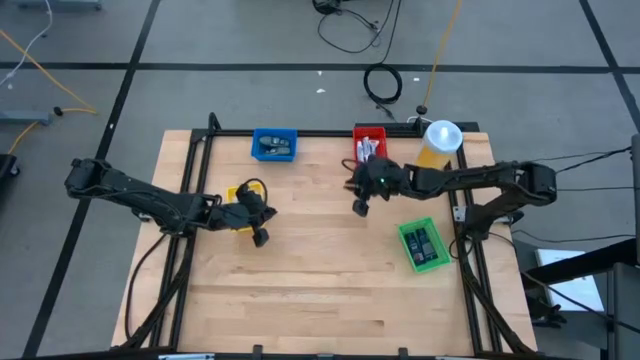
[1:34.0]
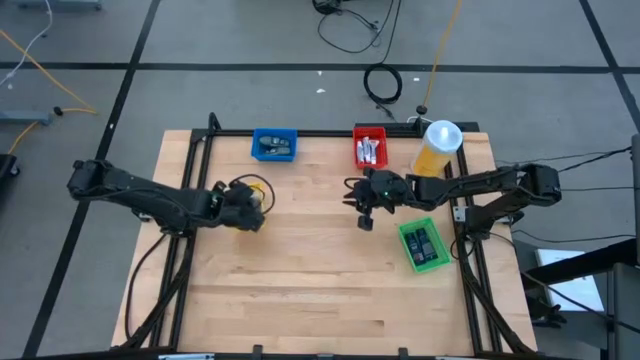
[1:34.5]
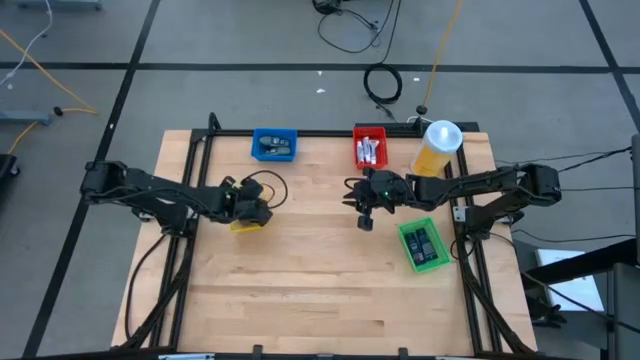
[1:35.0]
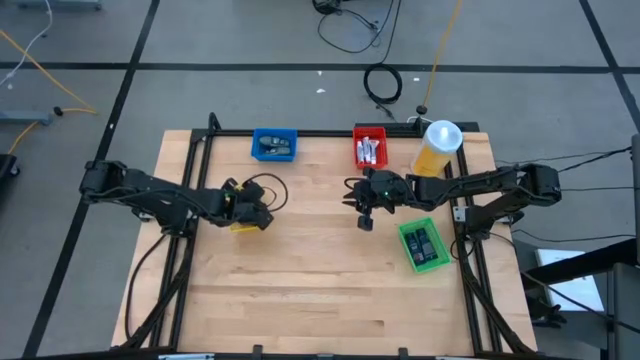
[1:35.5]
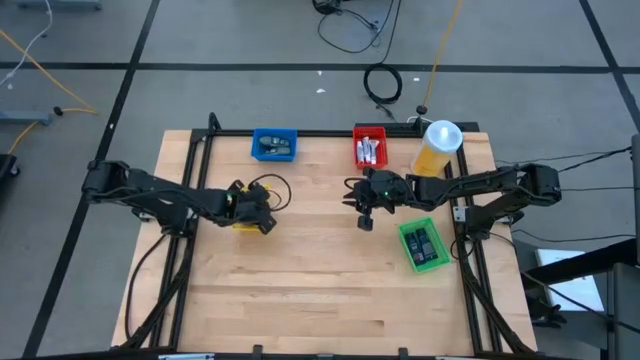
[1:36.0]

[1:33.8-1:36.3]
Task: Pick & Place Travel size toiletries
Adjust the yellow bin on the table

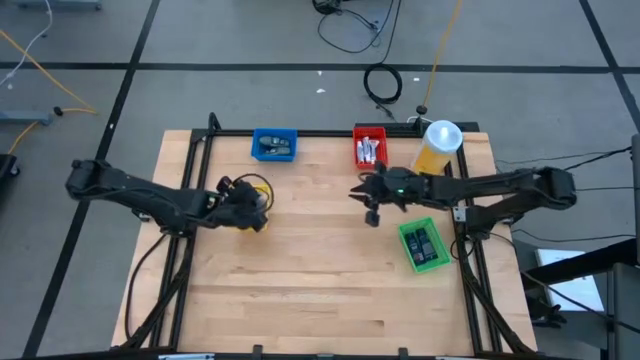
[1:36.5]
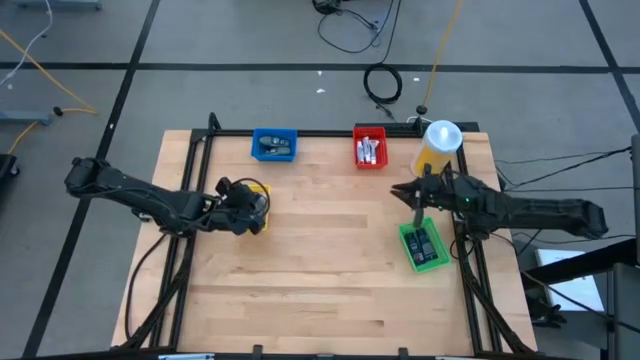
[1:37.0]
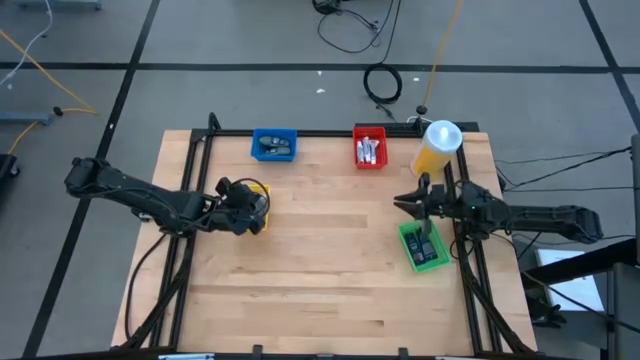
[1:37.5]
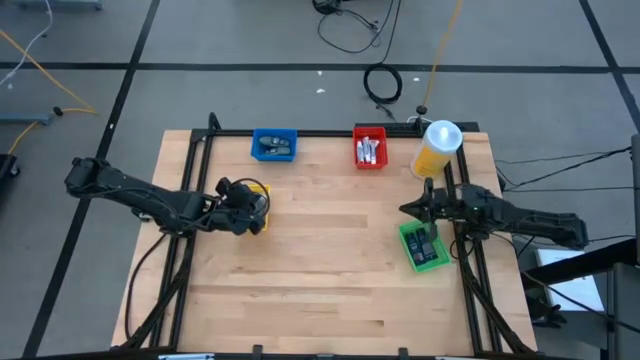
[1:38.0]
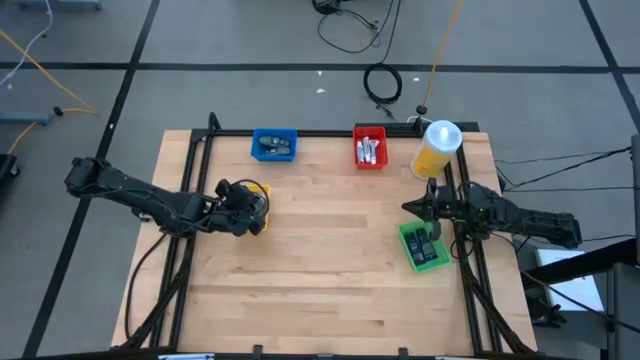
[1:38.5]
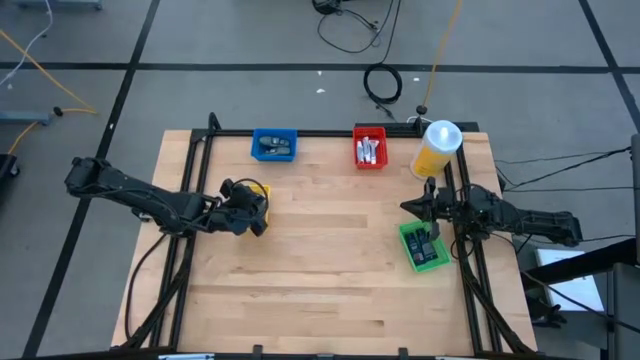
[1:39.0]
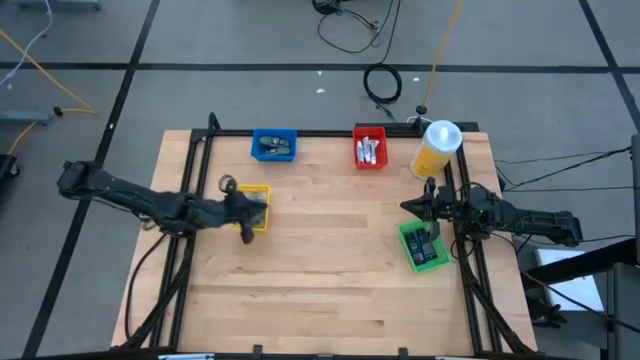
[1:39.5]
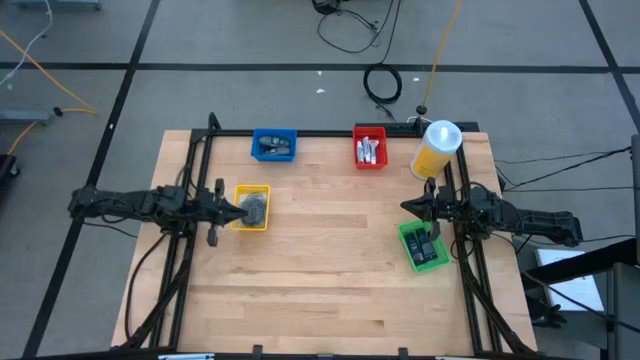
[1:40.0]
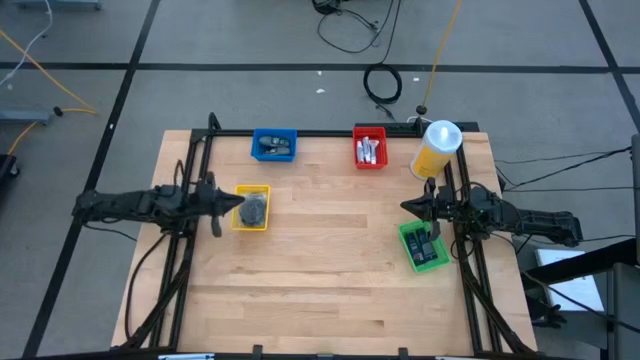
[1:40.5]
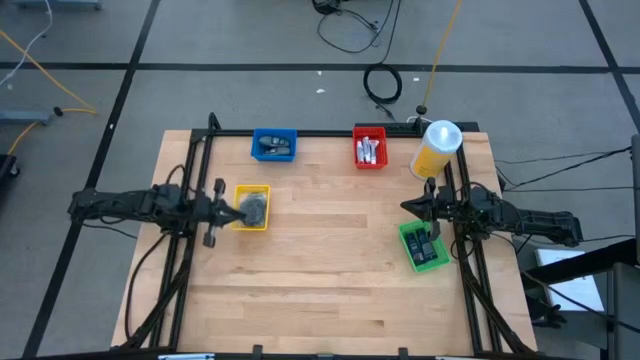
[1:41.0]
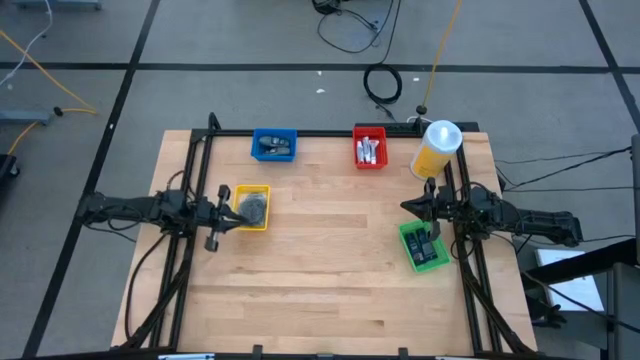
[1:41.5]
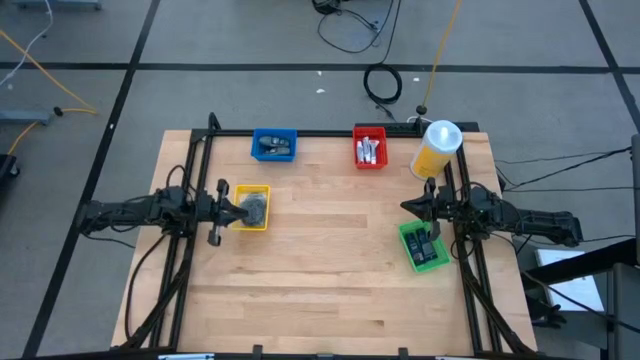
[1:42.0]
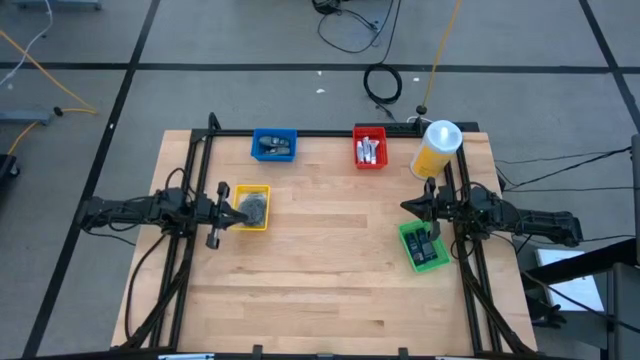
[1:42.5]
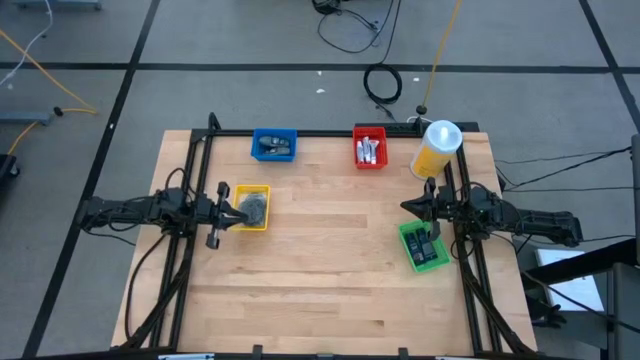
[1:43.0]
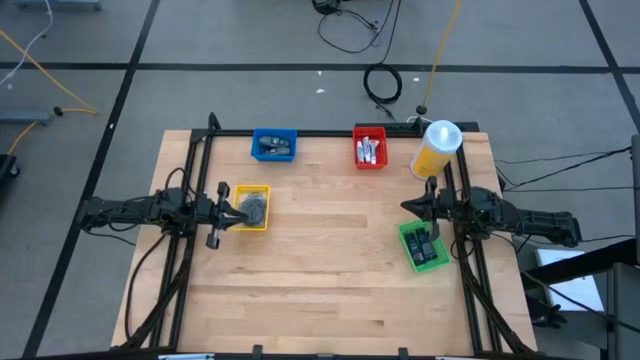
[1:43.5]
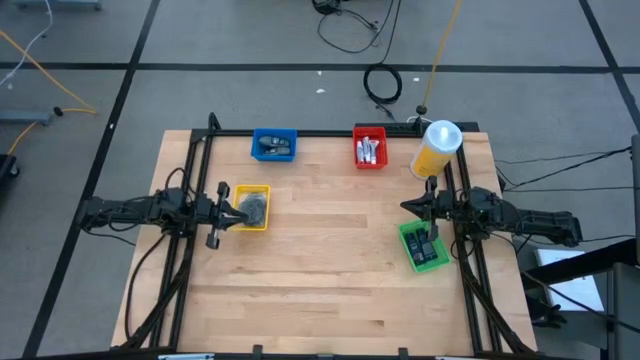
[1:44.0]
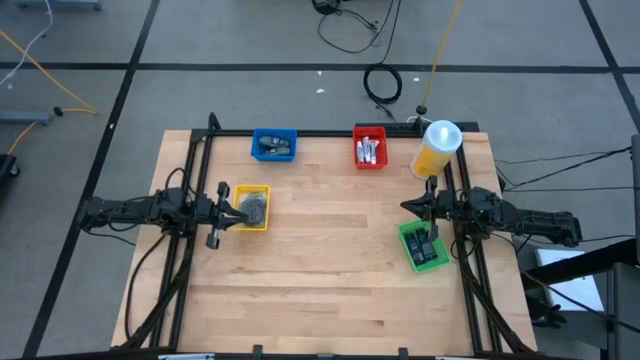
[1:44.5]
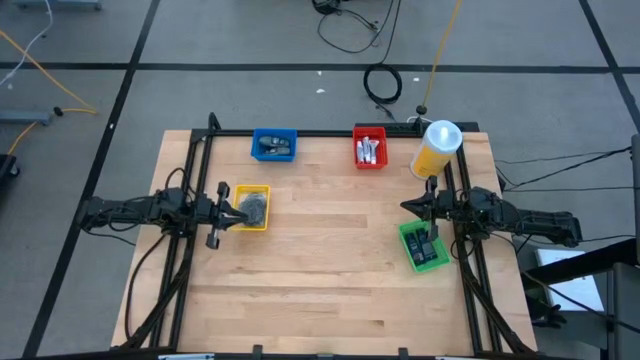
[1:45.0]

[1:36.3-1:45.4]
Return to Home Position

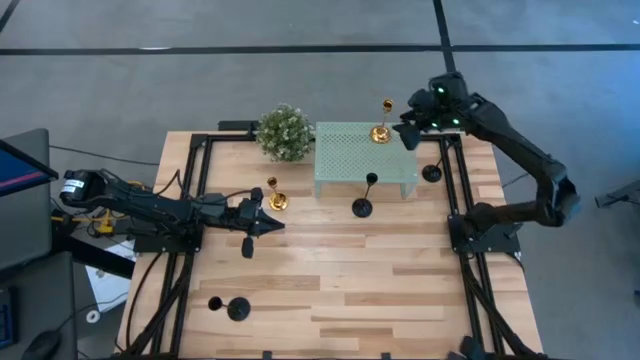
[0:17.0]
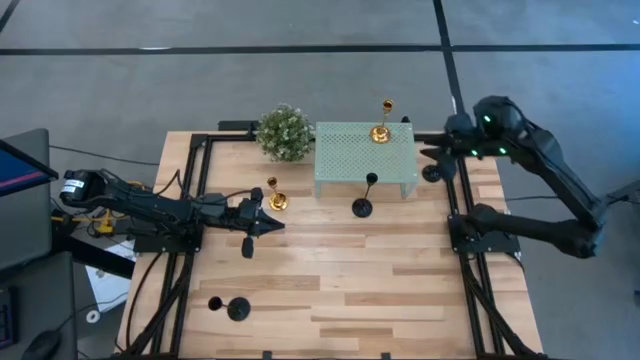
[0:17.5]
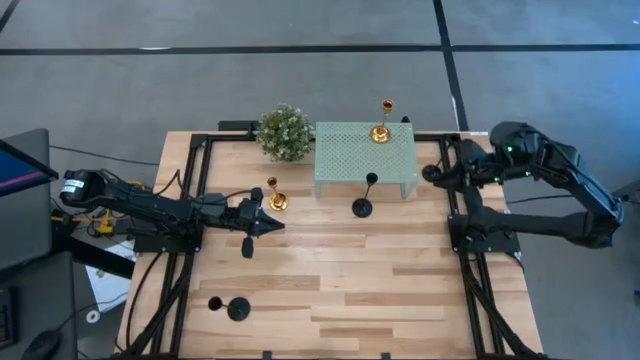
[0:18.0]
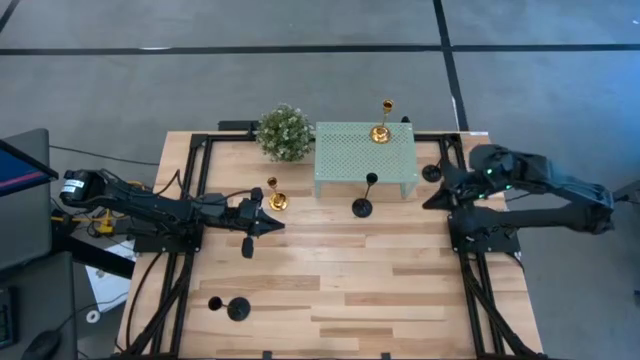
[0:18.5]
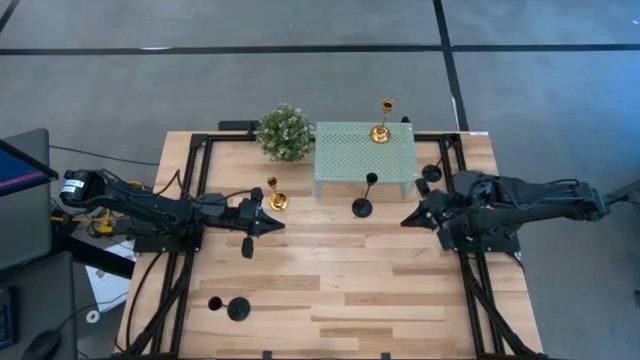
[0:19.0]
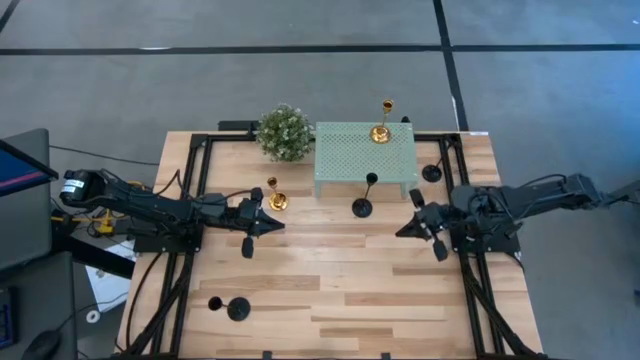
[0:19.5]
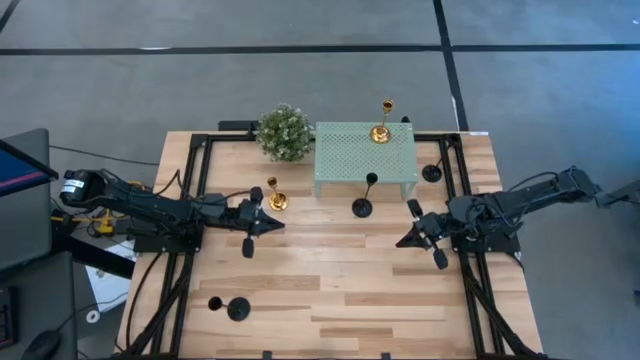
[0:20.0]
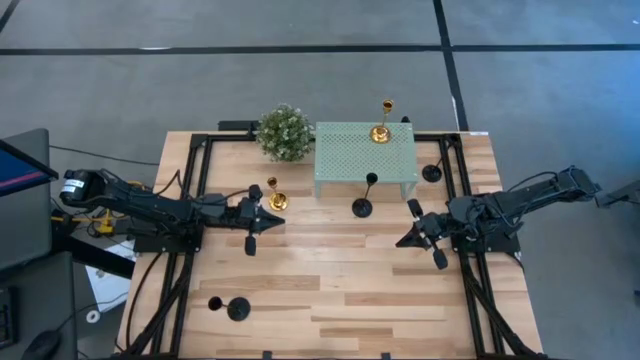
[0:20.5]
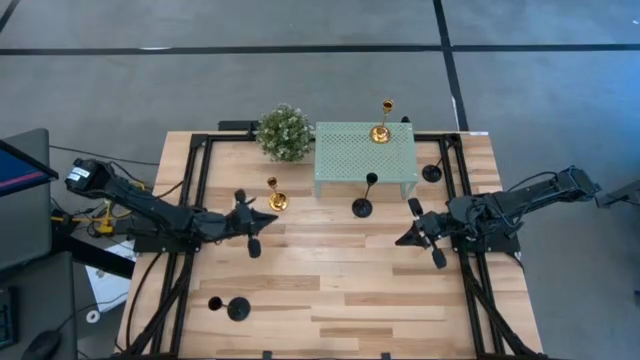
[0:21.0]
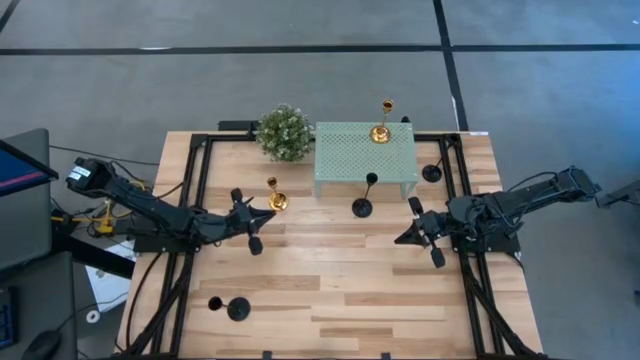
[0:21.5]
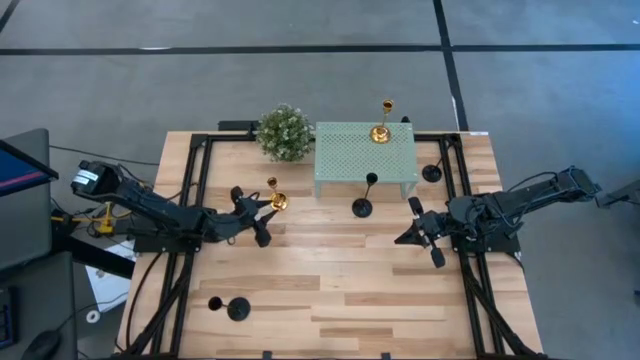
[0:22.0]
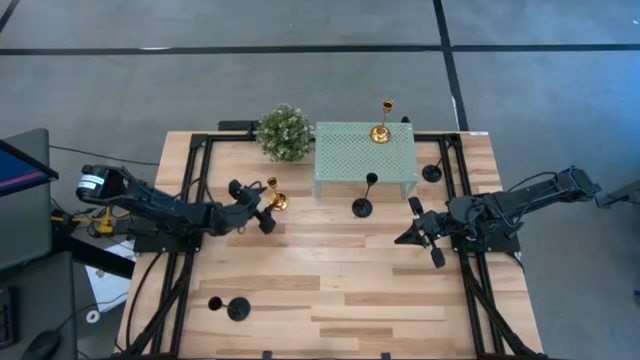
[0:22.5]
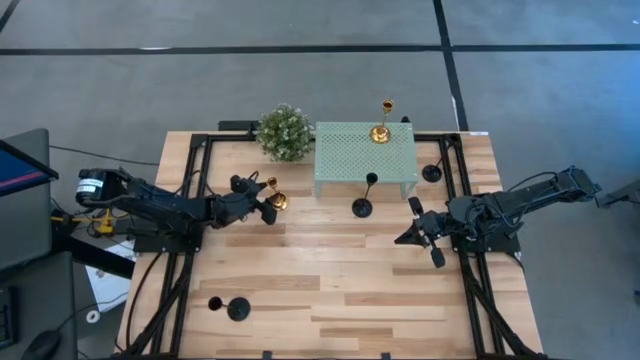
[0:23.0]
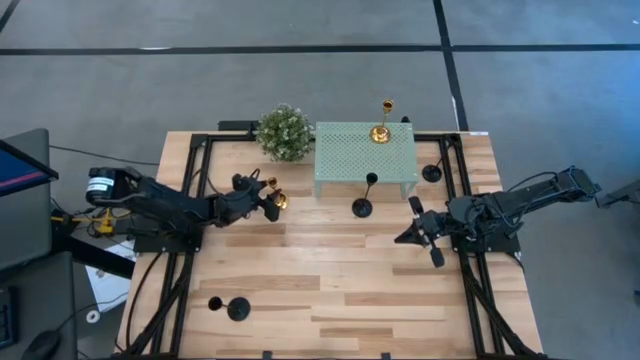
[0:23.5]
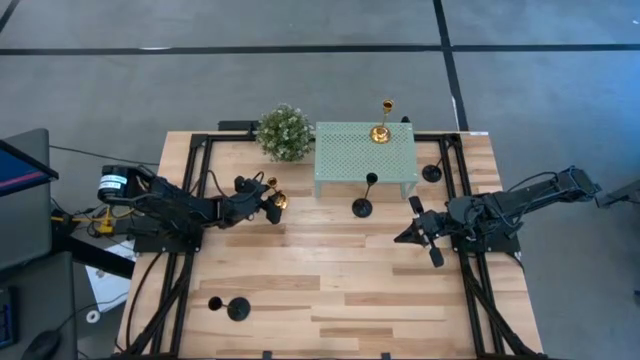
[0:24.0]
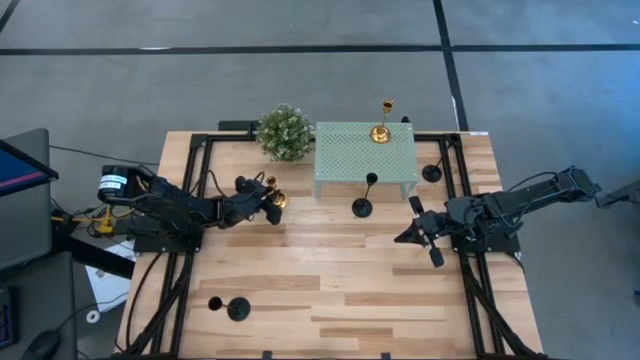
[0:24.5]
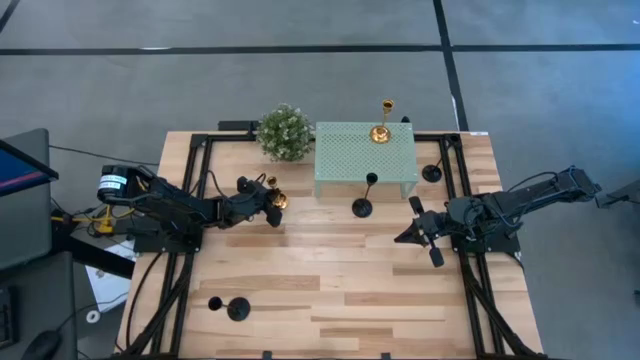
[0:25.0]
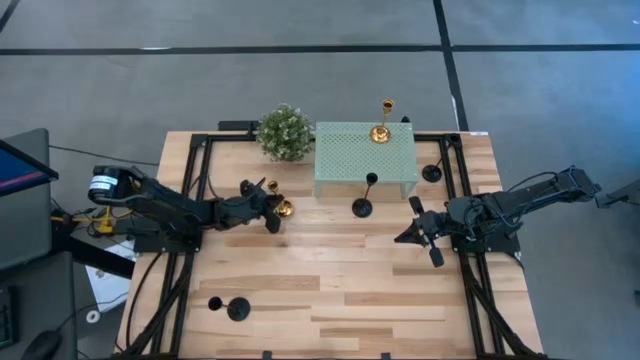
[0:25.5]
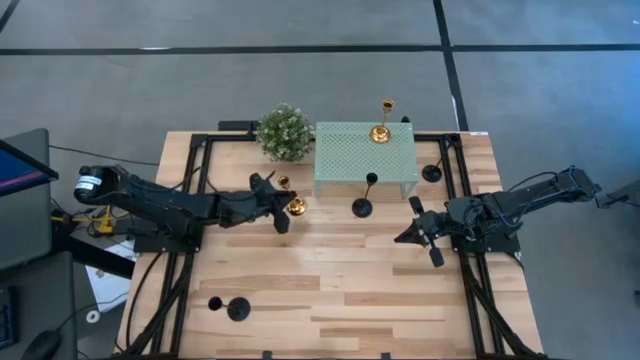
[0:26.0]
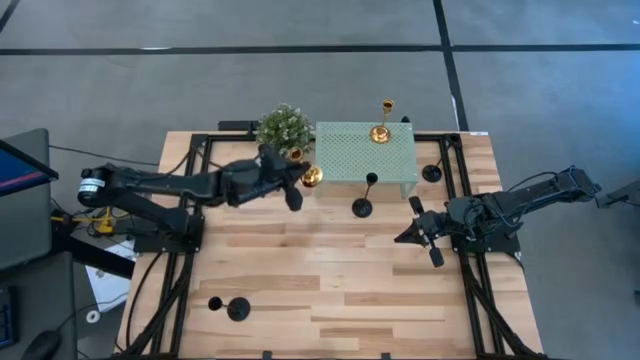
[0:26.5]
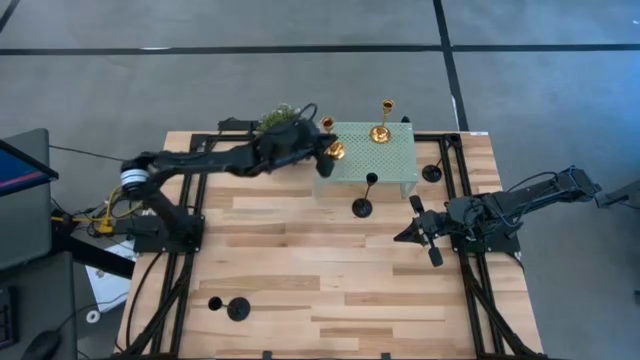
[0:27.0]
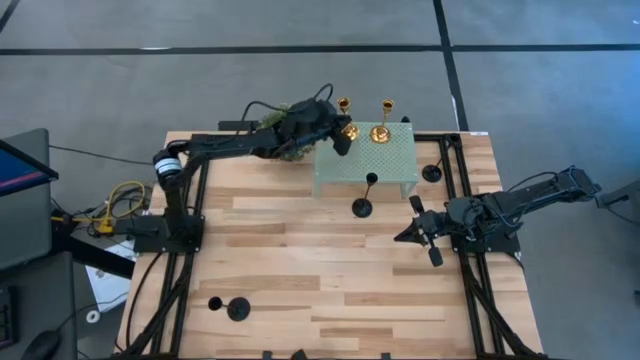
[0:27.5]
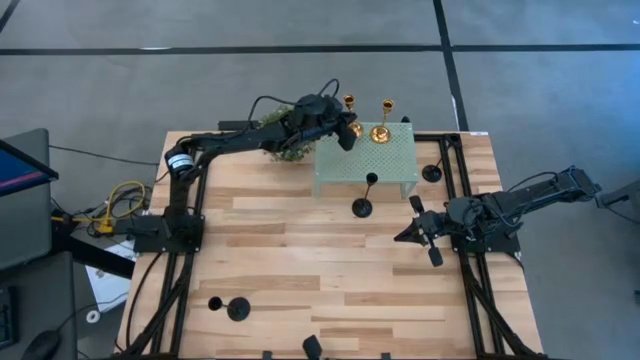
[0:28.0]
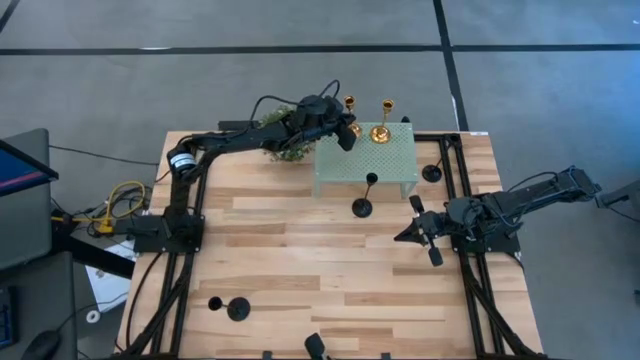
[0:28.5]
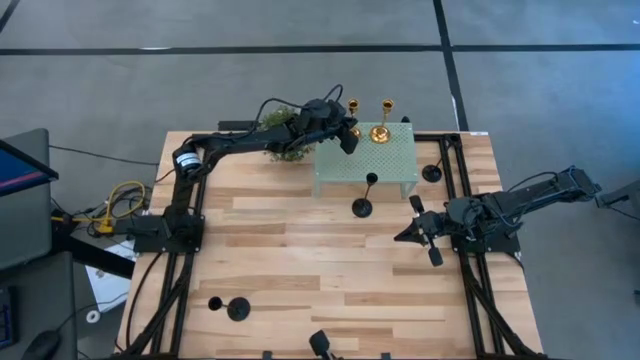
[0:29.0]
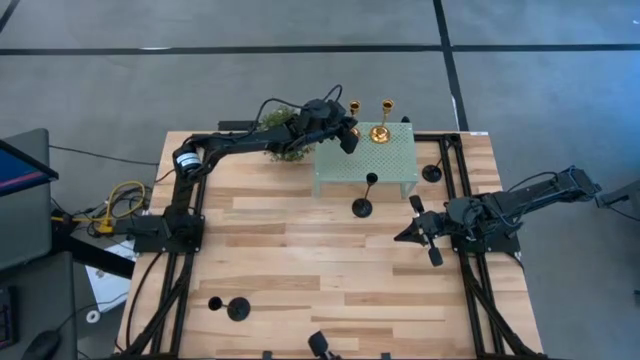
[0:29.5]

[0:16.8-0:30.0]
Task: Pick & Place candle stick holders
Put the golden candle holder on the shelf
